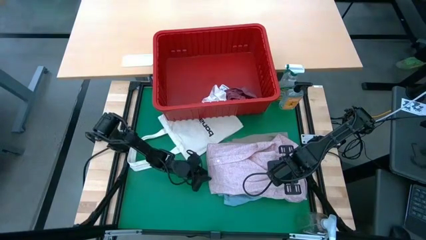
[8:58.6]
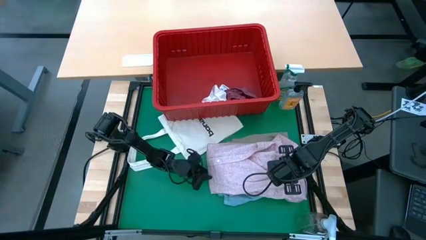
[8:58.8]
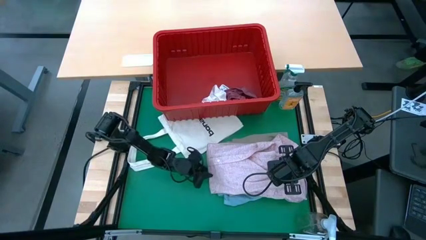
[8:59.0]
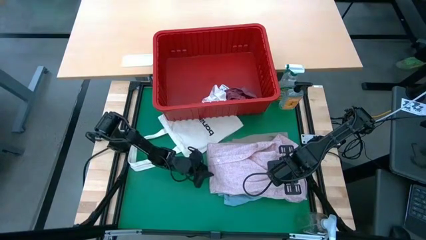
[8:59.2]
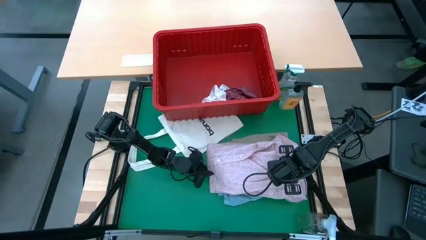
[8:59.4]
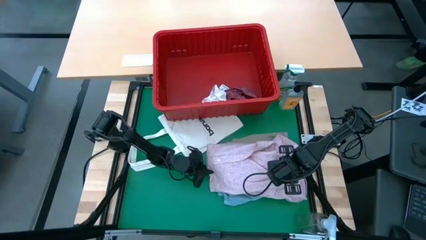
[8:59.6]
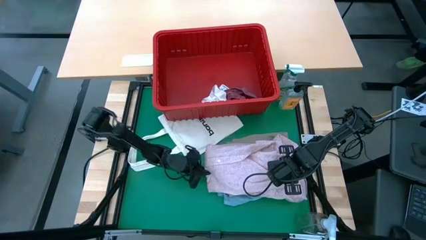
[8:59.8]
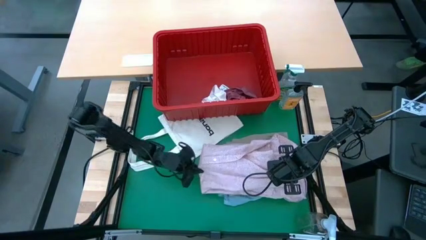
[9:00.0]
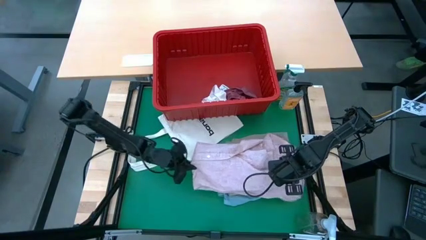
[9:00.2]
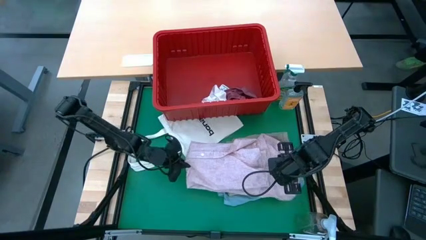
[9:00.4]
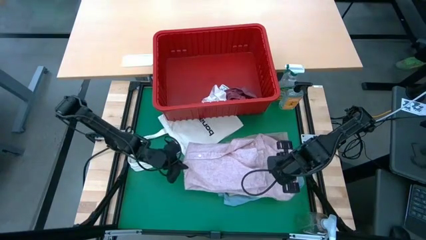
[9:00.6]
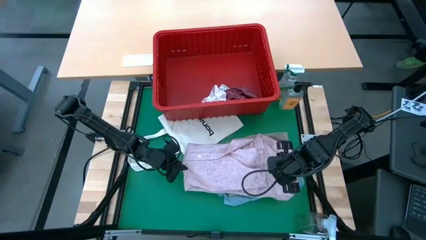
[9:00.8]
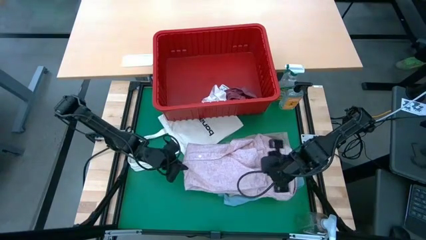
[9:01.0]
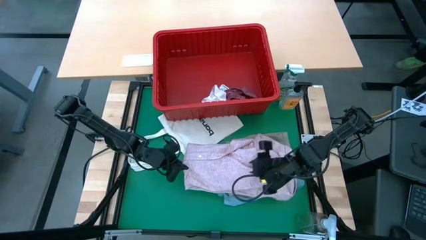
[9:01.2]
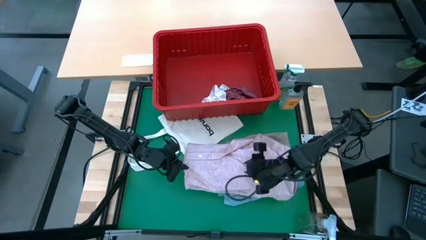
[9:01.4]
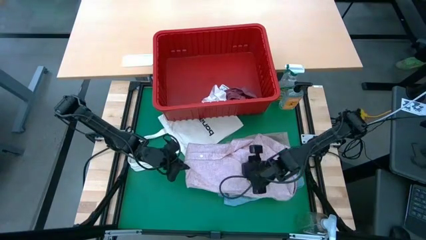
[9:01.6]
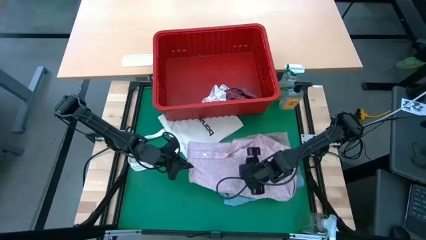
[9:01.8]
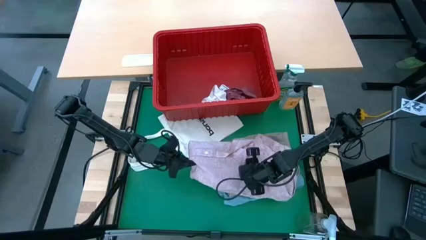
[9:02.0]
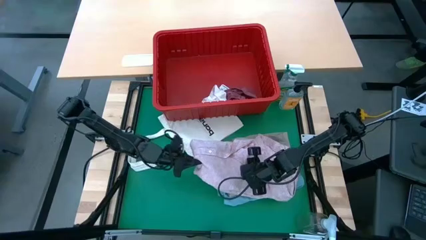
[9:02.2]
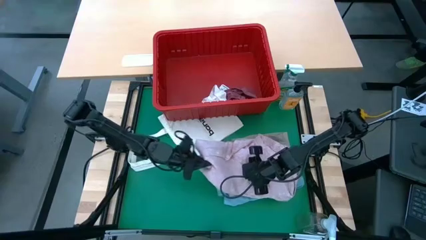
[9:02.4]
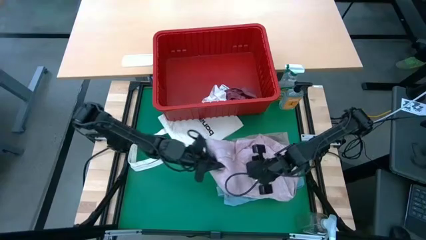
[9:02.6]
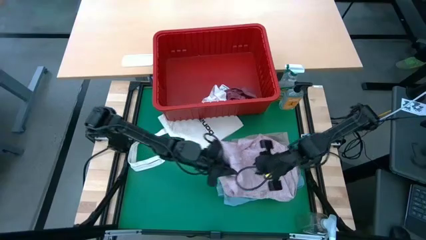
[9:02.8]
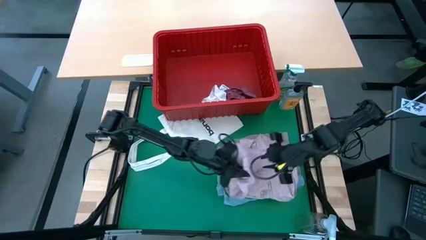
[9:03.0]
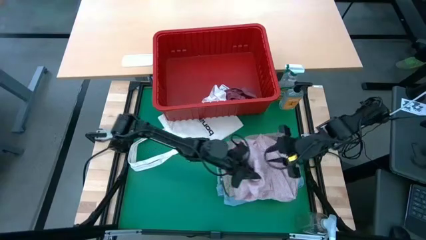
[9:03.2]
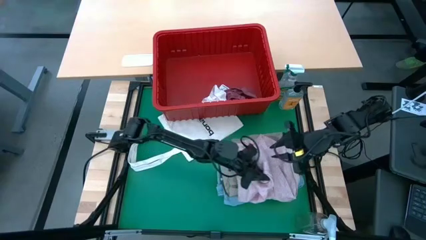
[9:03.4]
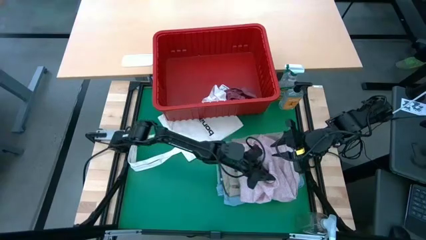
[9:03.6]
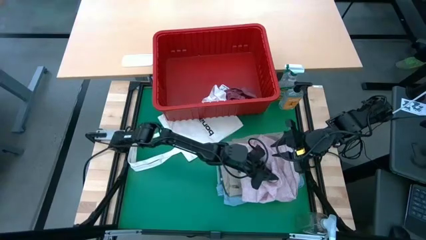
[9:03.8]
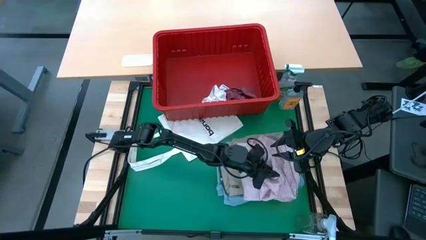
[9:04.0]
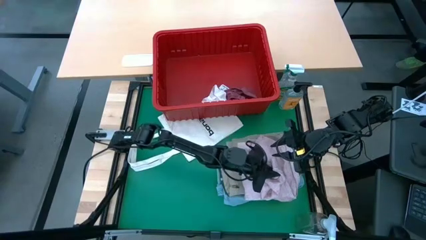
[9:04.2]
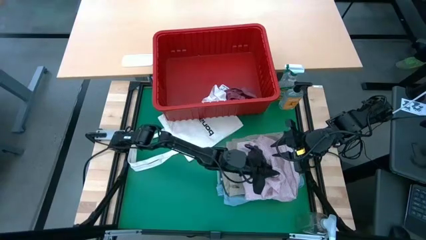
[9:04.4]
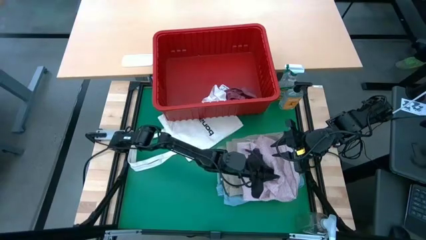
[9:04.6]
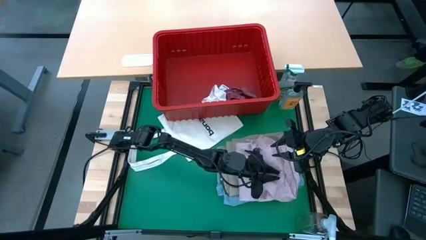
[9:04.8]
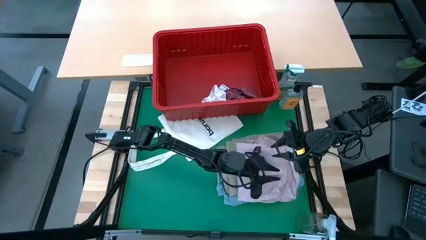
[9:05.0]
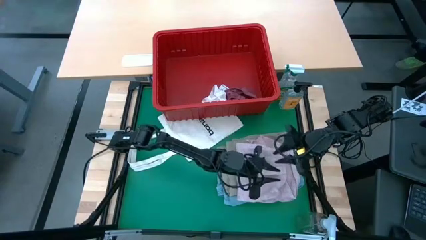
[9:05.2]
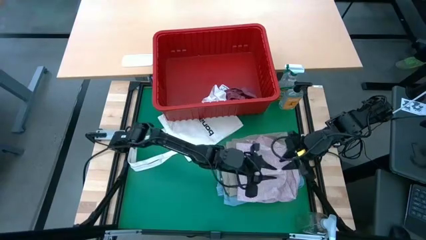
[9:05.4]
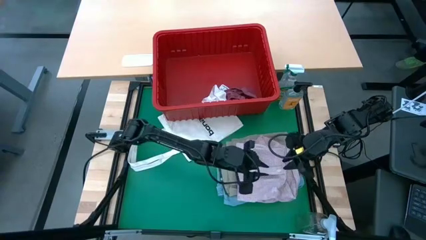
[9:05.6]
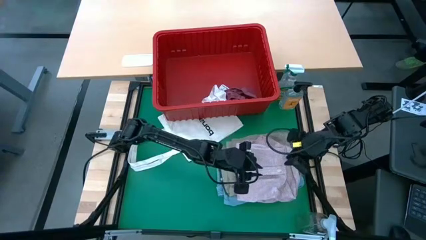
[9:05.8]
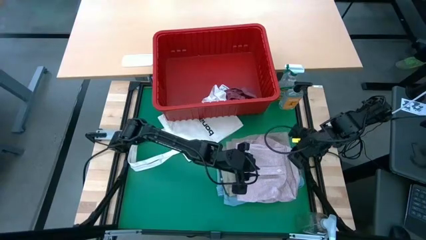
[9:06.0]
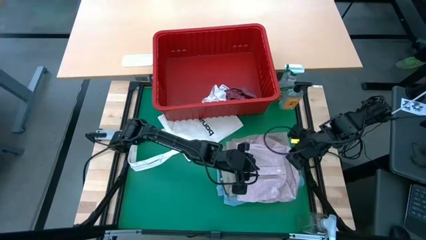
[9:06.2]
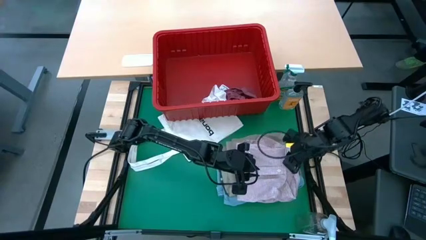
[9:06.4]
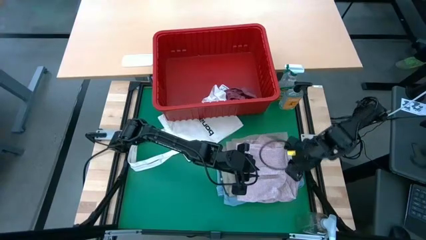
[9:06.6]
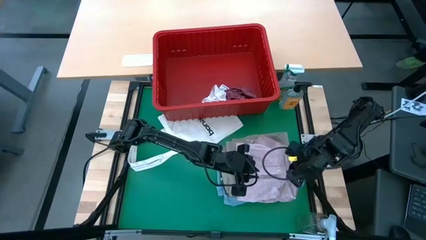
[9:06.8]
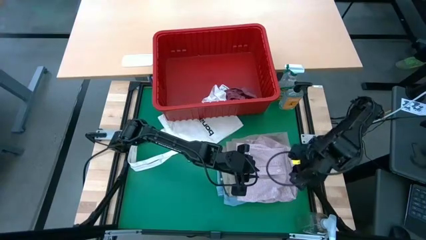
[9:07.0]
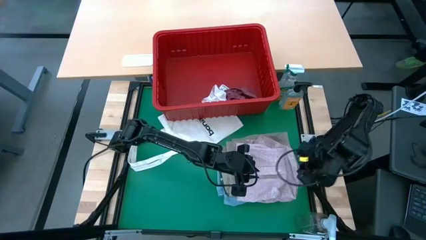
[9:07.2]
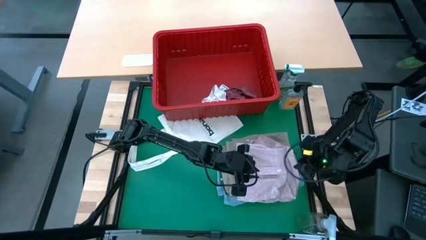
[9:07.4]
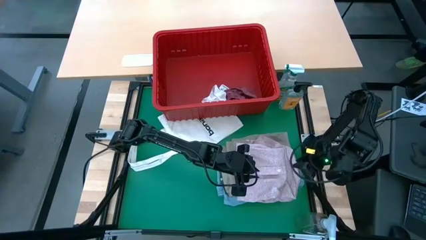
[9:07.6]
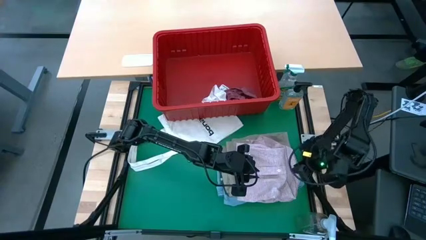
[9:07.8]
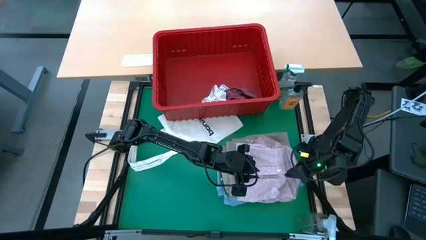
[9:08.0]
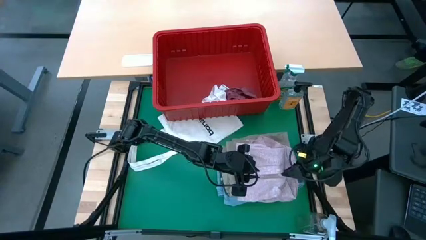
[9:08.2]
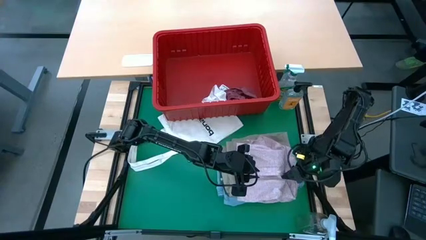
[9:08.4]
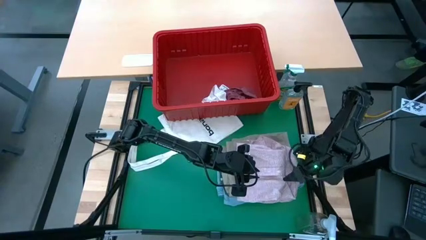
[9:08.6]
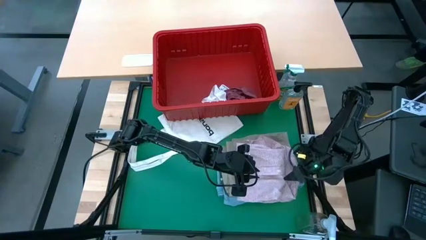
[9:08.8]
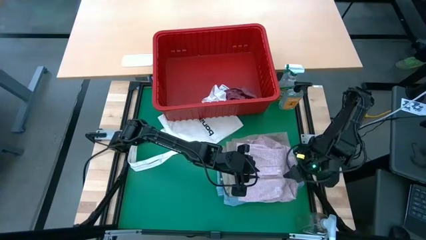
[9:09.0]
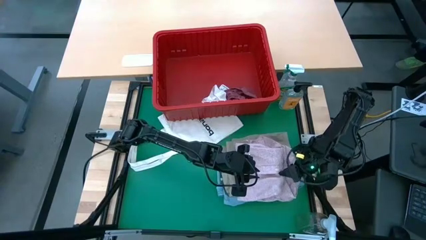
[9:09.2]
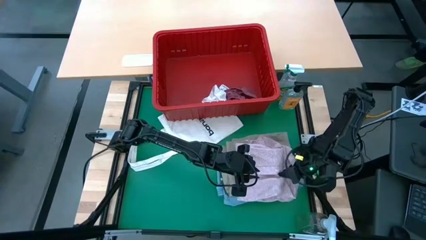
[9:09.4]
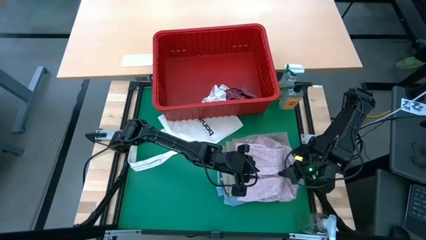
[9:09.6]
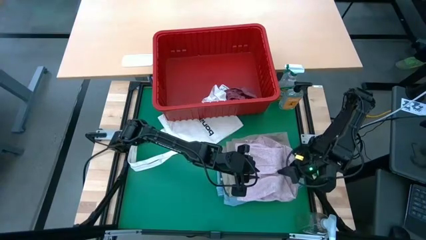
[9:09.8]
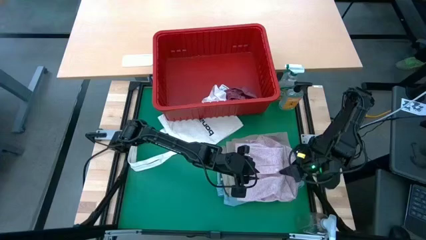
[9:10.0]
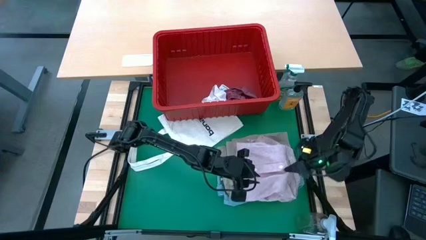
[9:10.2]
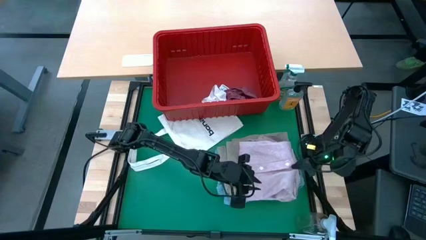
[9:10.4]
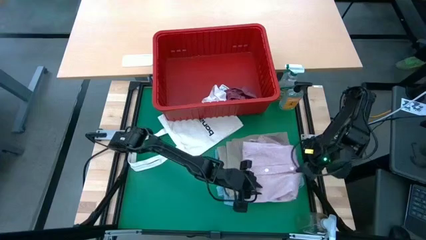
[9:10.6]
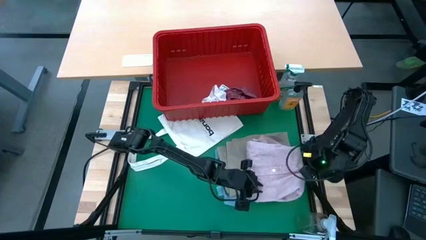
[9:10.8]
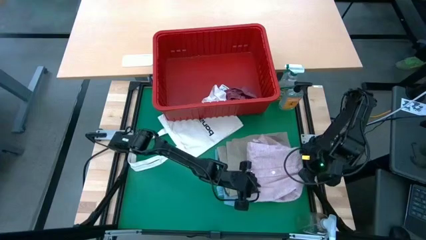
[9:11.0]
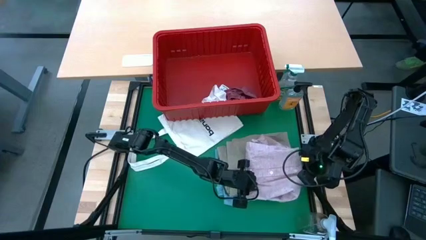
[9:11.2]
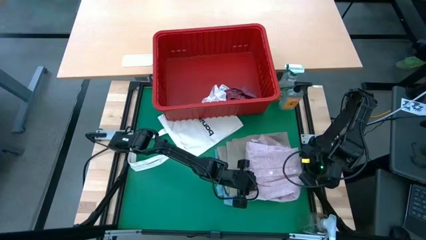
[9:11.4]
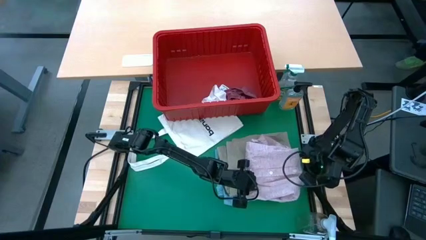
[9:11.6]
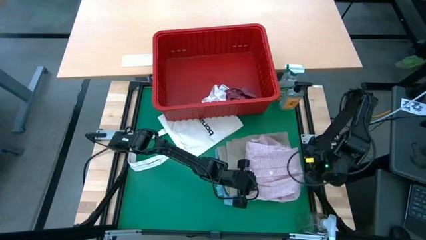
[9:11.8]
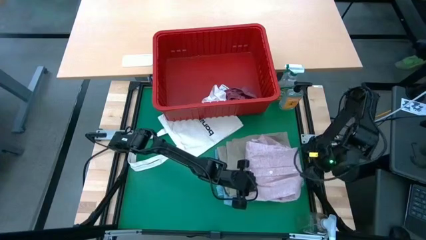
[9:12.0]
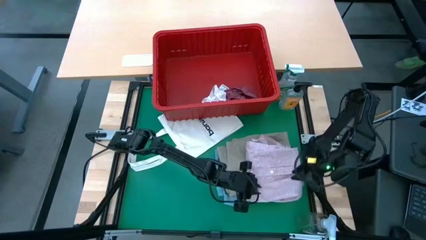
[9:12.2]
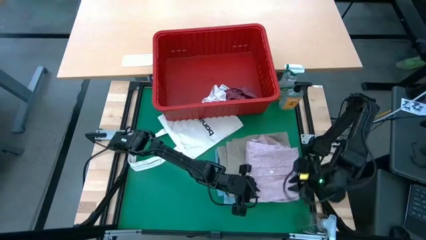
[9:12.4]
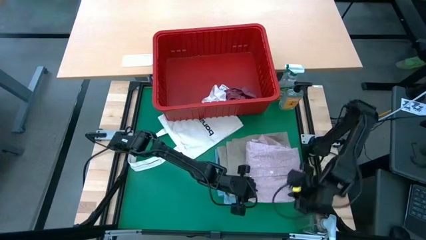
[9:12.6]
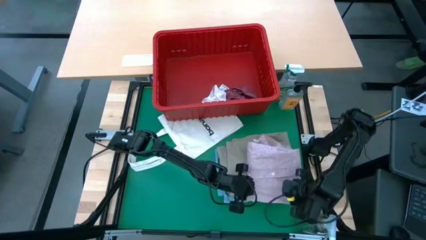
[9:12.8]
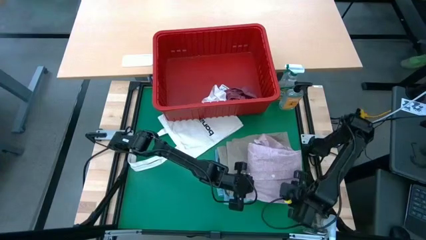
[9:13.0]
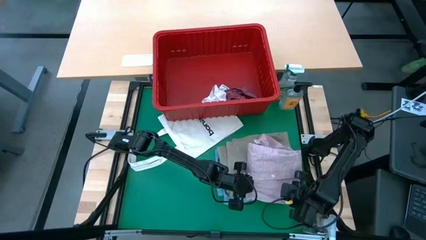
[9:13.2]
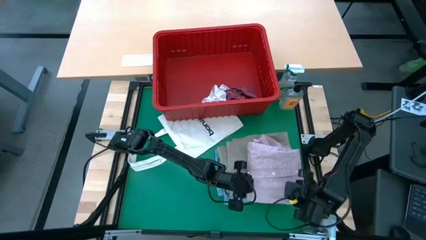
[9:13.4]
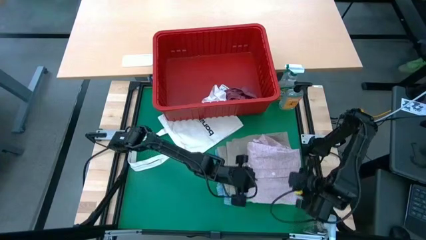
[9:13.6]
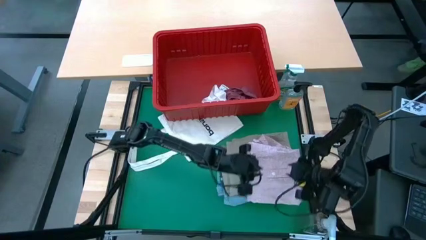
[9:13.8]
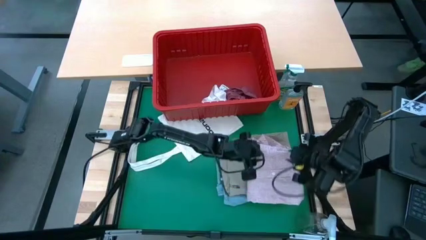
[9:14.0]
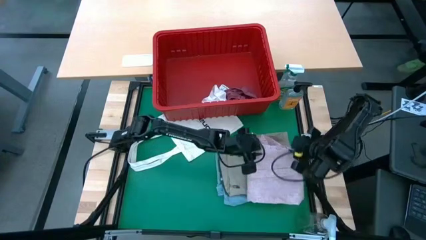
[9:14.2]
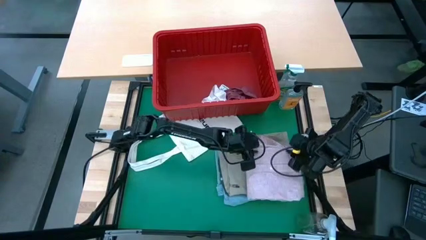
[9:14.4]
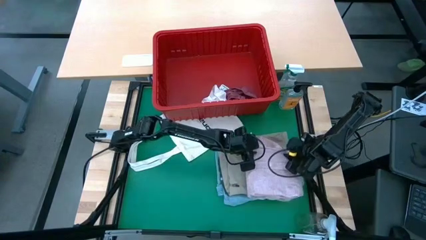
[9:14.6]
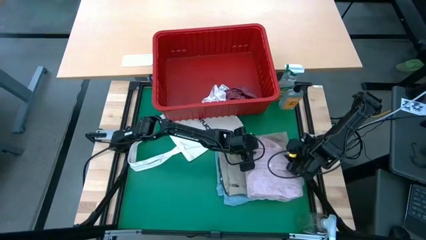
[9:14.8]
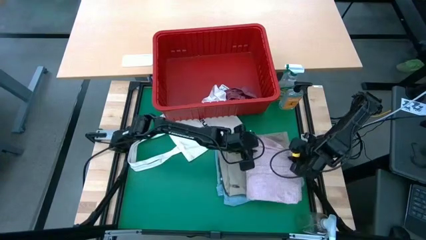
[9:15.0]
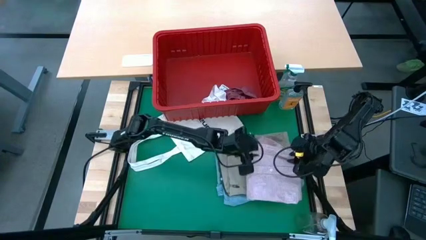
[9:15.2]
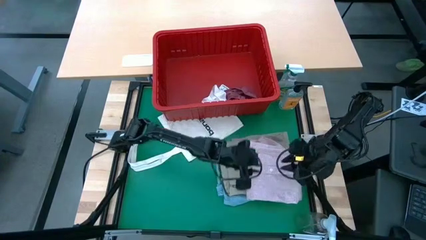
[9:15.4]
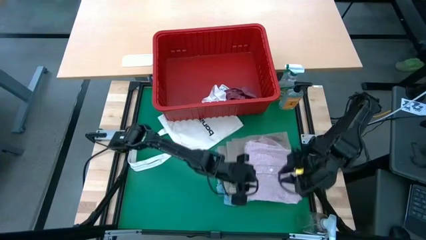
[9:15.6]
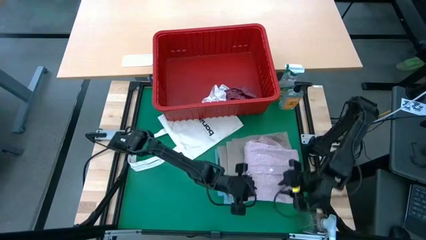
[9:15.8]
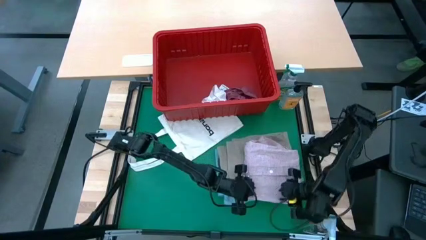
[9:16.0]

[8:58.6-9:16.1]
Task: Fold laundry
Fold the pink shirt
